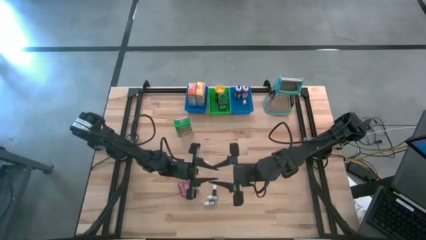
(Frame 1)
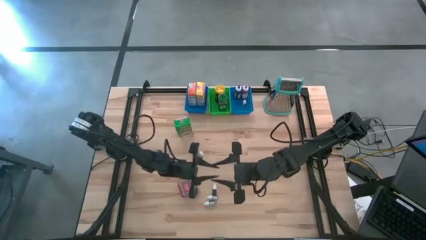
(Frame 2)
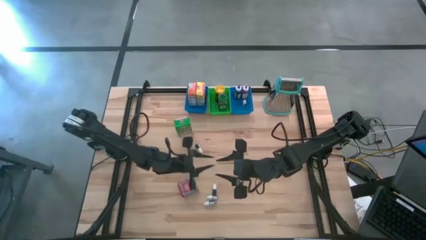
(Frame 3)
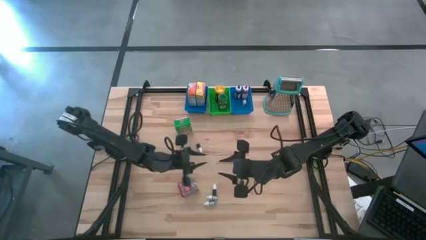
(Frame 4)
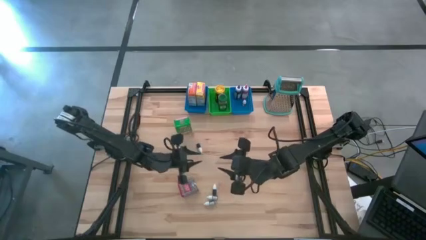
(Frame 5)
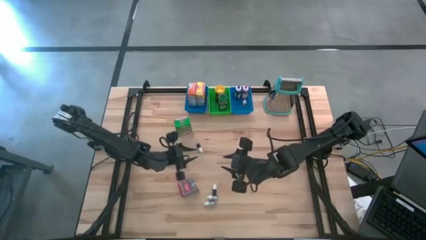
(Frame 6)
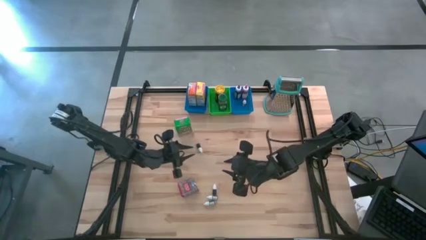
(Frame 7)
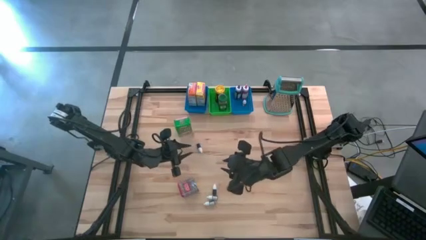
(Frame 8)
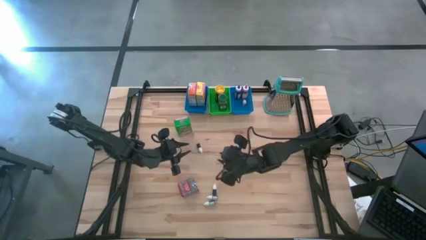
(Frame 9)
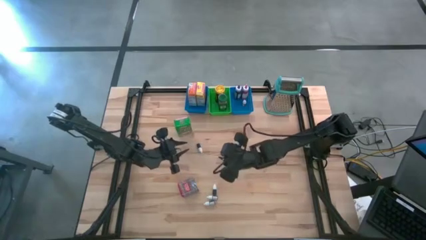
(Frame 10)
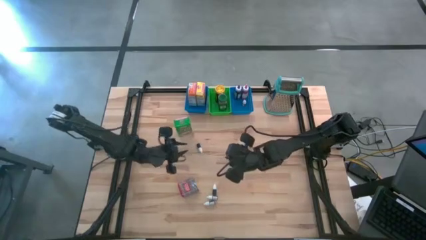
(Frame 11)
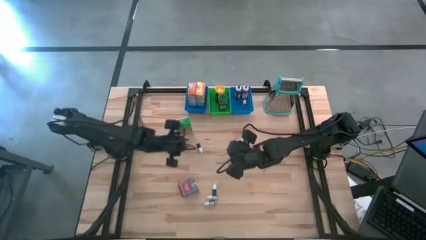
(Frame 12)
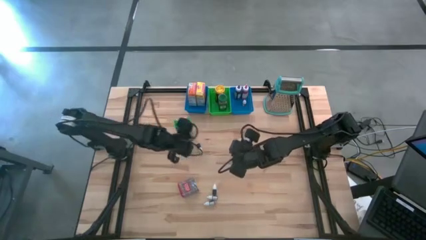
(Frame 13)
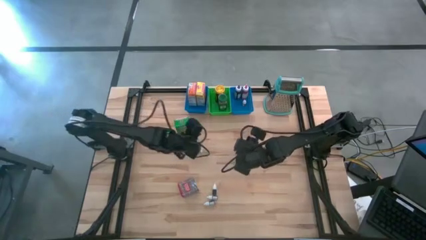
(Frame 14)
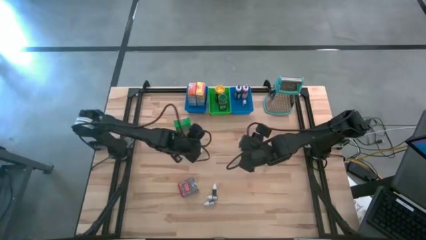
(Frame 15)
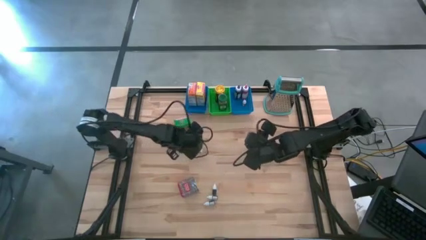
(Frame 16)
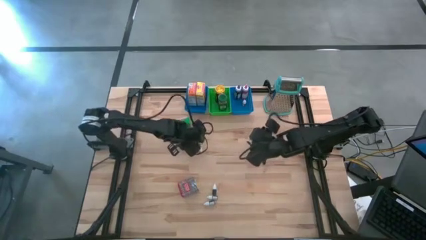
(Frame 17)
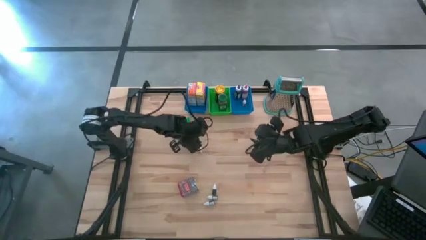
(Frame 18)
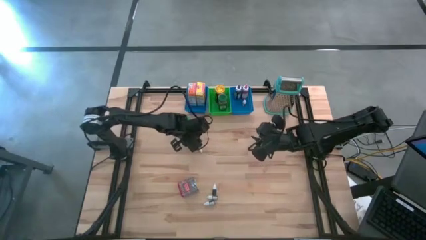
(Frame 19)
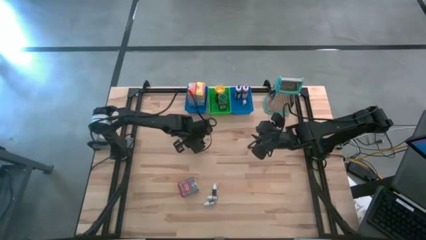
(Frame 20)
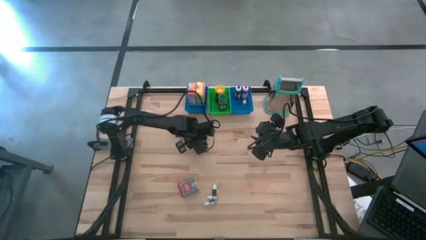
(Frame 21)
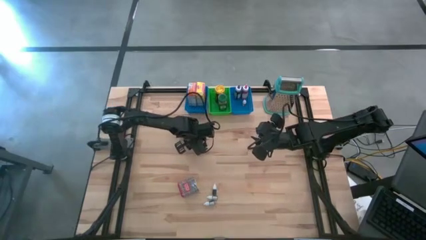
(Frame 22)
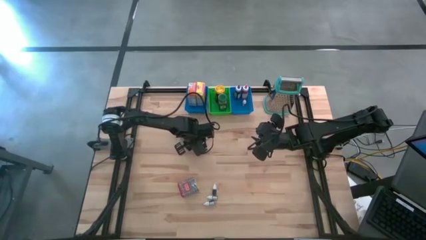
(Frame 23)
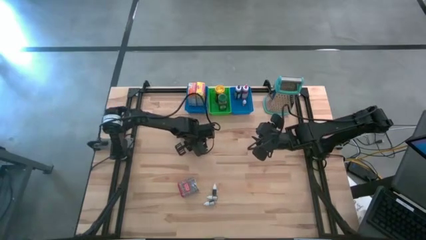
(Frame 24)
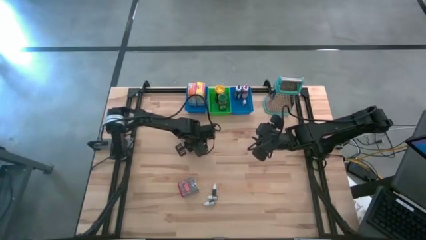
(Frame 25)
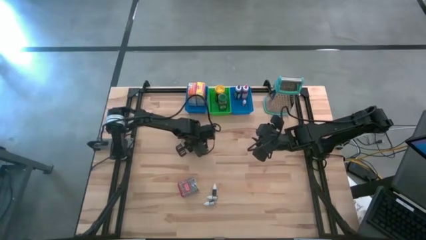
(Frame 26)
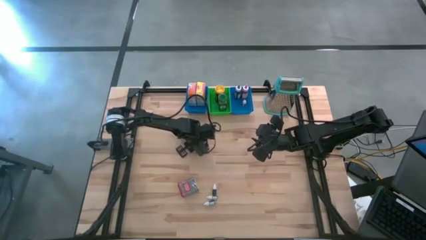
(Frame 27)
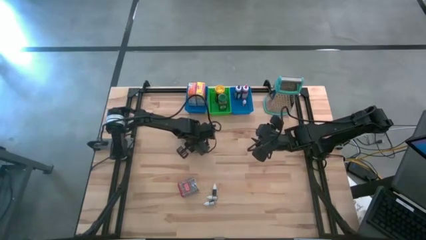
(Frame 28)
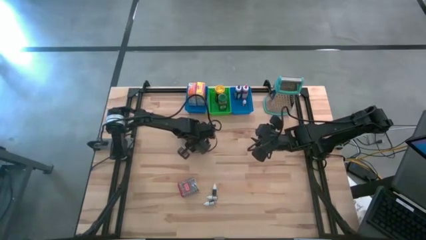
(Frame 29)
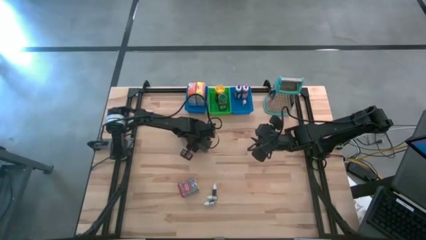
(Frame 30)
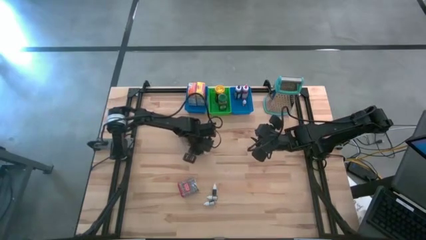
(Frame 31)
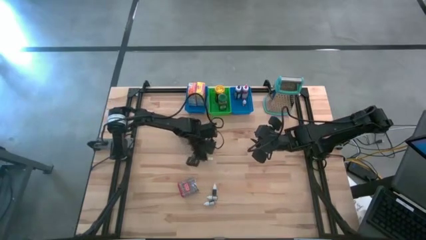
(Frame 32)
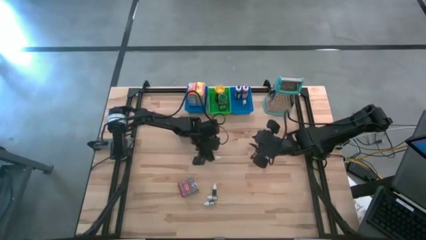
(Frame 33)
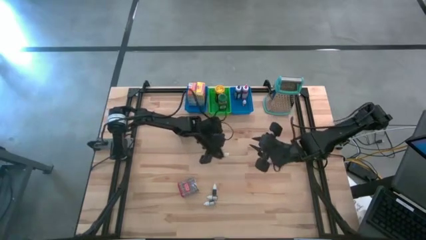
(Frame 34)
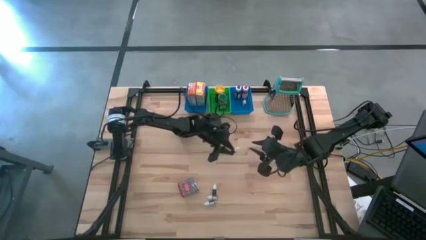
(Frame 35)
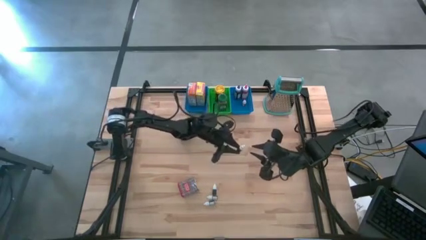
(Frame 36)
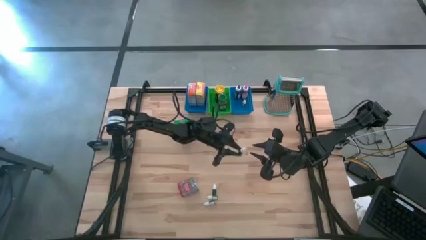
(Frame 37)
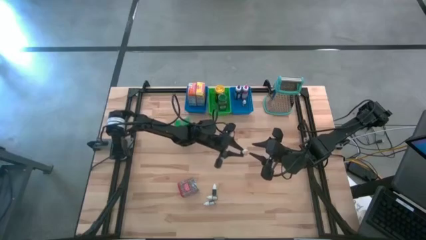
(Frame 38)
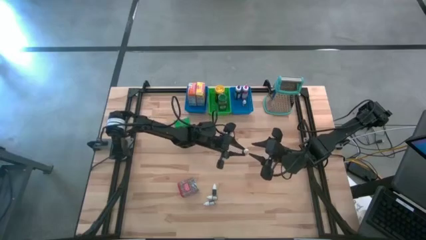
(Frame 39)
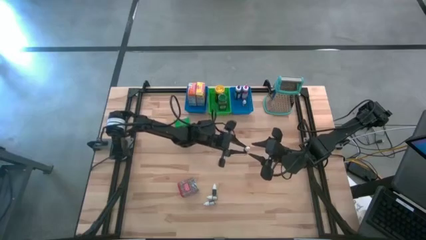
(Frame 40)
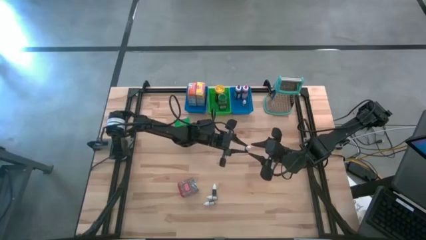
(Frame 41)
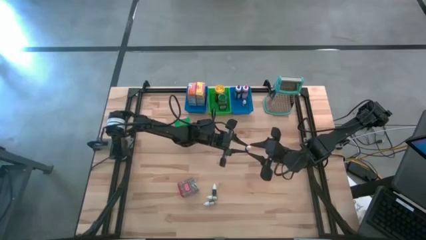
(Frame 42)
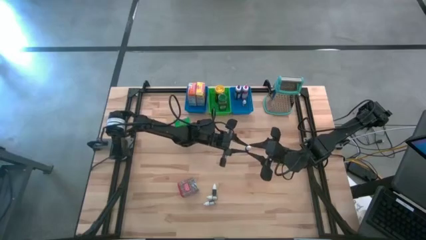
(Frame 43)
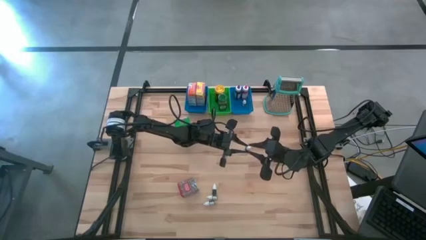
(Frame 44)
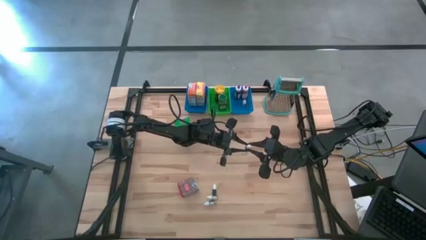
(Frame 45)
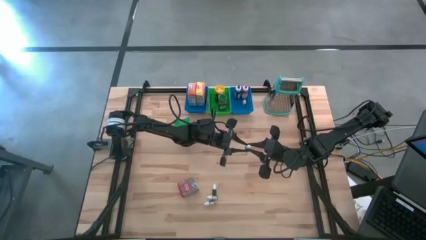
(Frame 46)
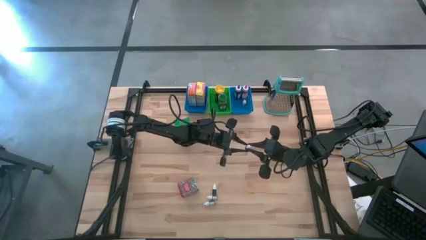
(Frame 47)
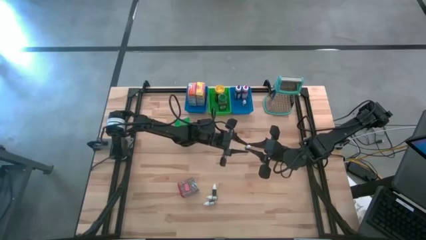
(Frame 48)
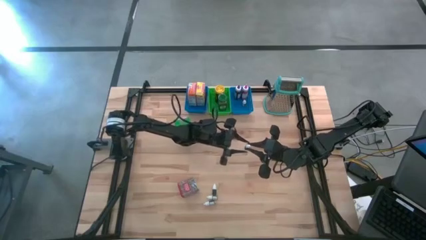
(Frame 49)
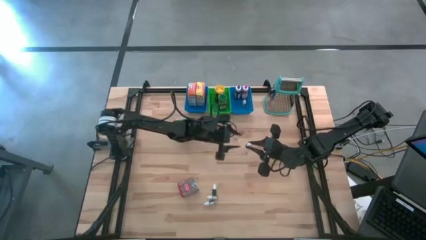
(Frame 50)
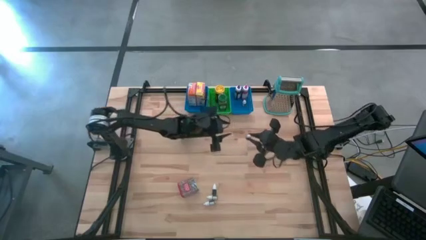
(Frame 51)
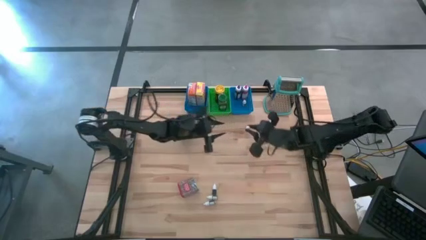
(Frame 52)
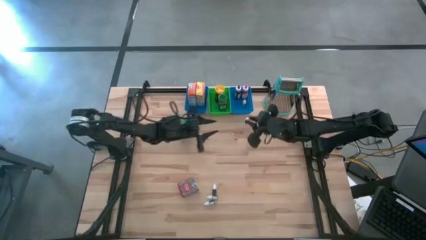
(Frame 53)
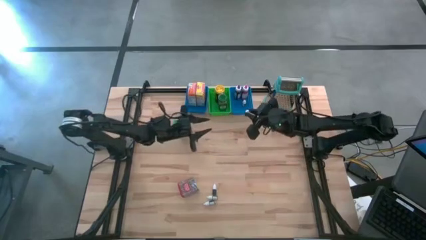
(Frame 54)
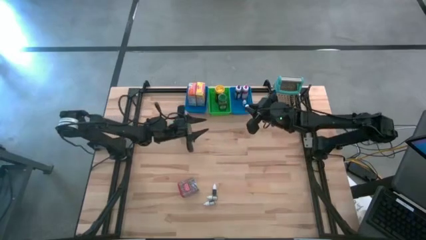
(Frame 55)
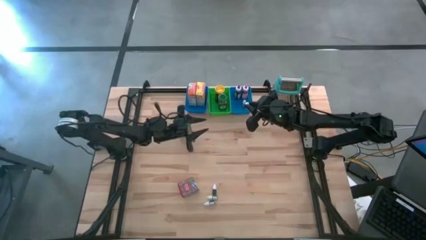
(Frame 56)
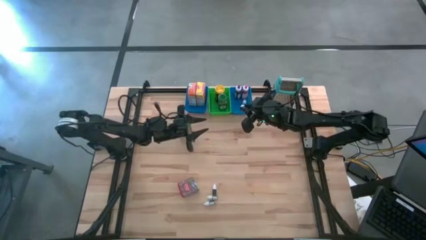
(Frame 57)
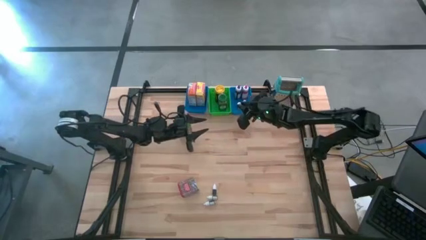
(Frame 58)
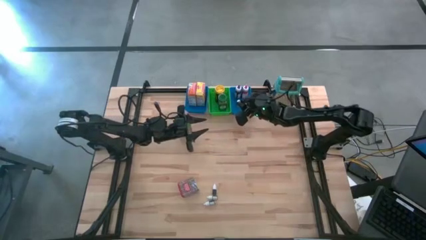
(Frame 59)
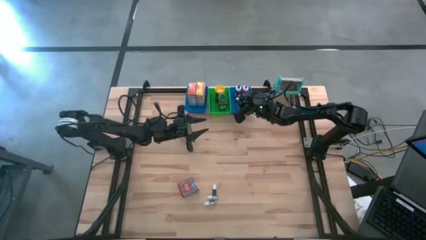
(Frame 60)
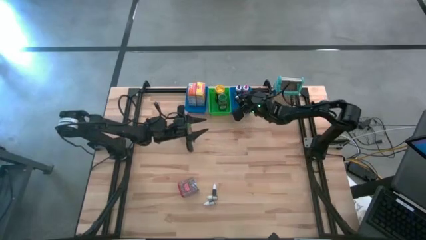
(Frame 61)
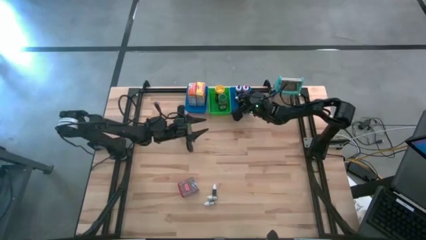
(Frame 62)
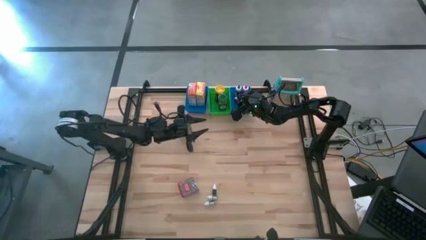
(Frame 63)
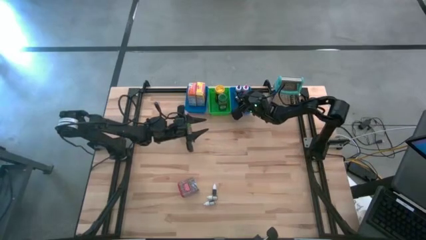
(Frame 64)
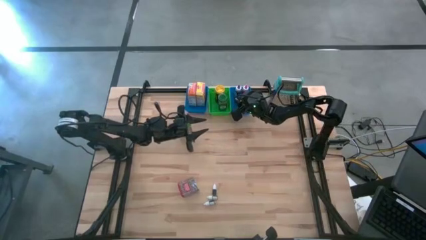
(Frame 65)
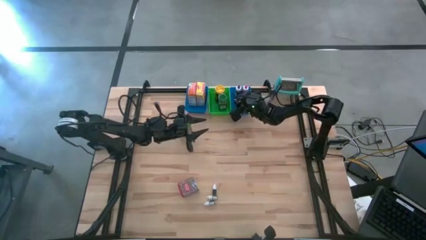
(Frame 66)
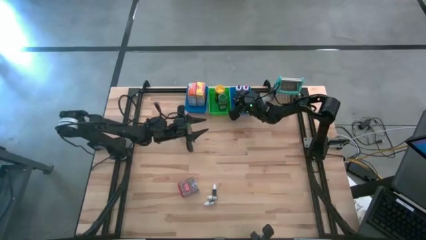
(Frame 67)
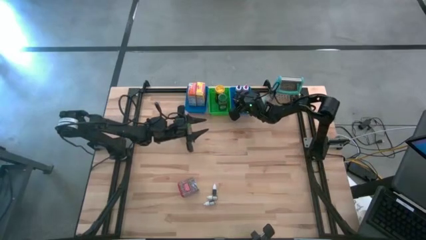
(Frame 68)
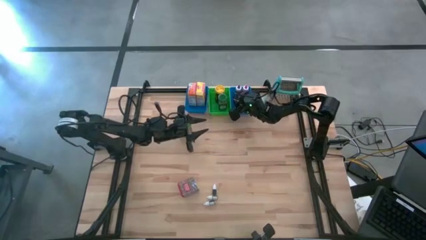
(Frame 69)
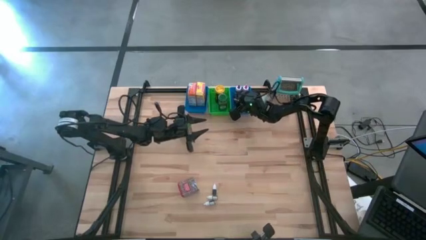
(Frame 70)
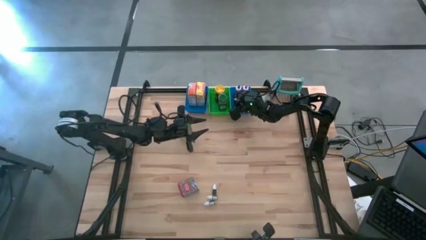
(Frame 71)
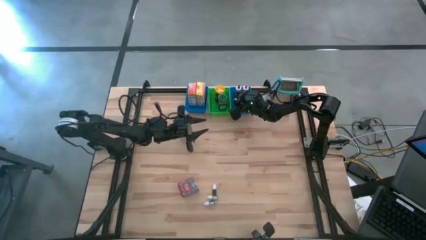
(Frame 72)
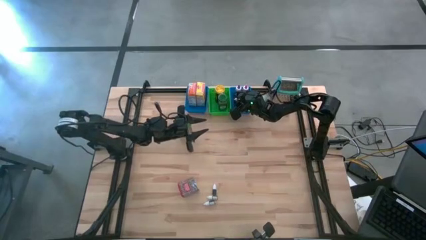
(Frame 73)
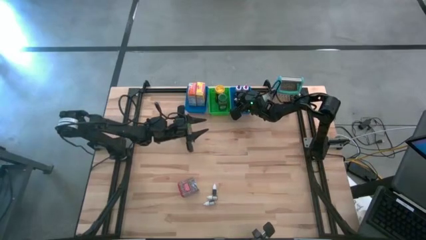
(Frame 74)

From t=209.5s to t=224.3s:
Task: Pick & Place Kitchen Items
Put the small green food coloring bottle into the right blue bin

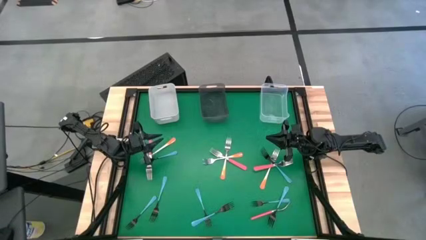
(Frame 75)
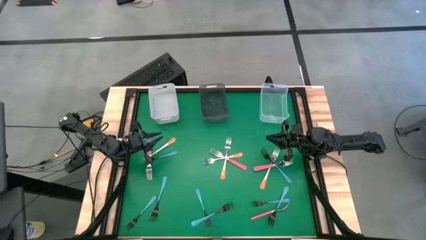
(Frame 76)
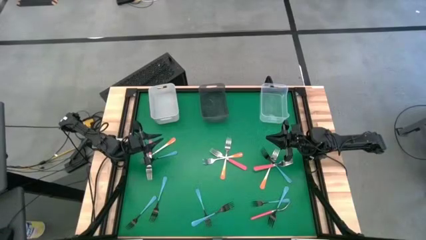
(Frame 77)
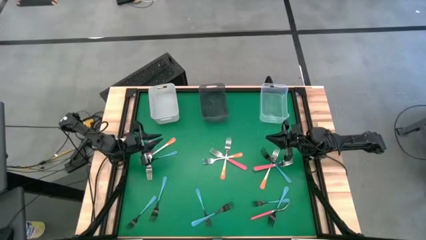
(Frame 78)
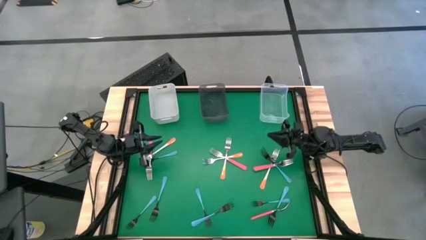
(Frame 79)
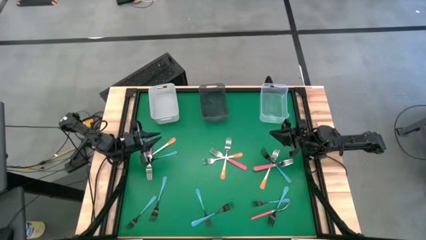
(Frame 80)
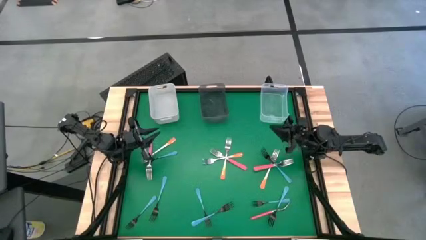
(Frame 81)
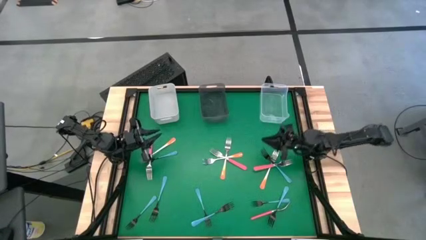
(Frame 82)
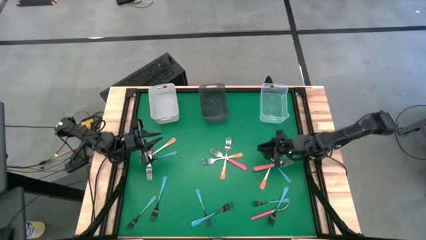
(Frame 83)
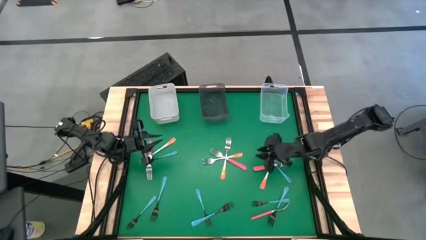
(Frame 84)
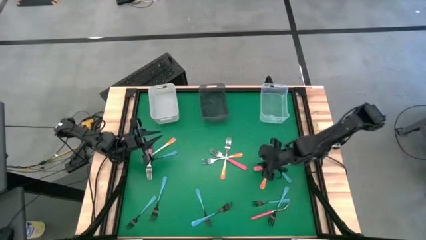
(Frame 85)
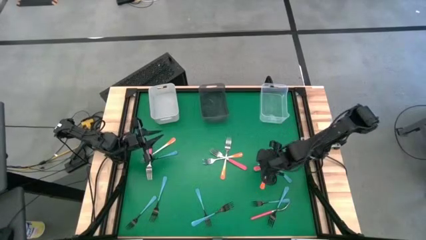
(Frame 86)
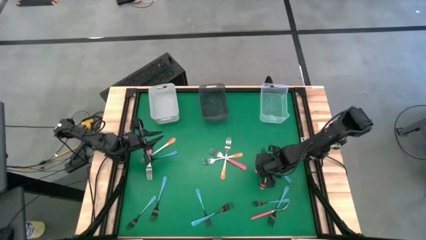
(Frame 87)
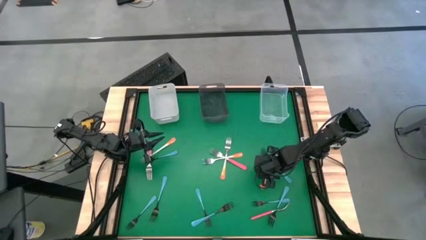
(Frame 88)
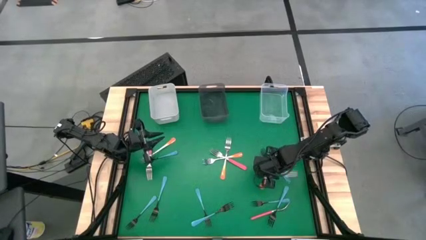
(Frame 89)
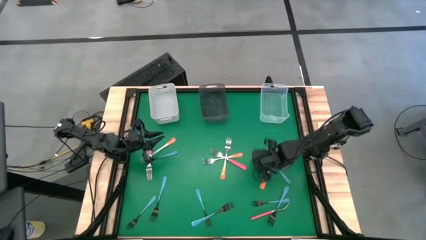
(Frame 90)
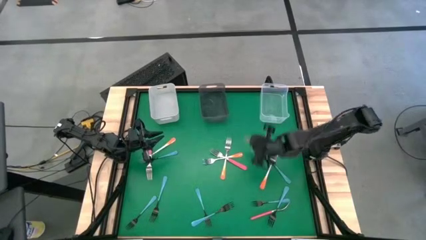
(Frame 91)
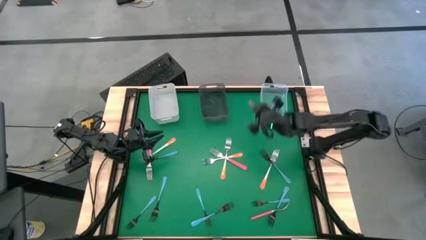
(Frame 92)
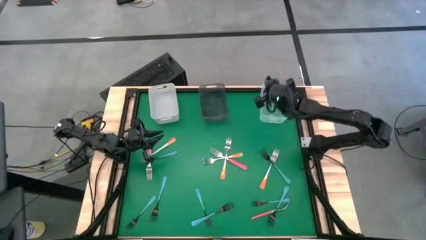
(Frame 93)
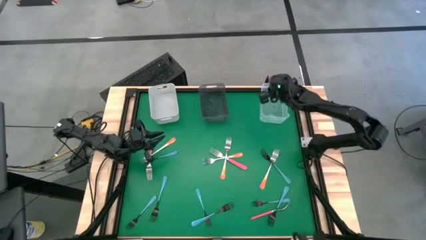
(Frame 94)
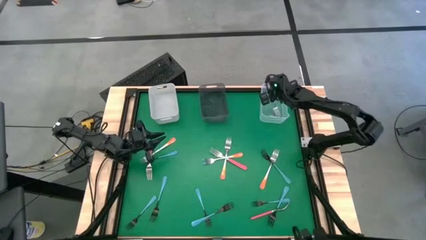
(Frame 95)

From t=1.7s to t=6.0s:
Task: Sort silverware by color (type)
Put the pink fork into the transparent bin
